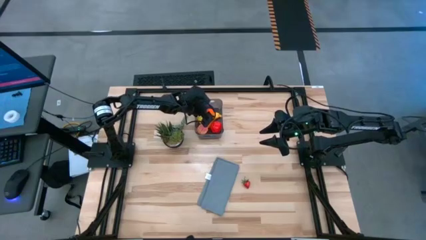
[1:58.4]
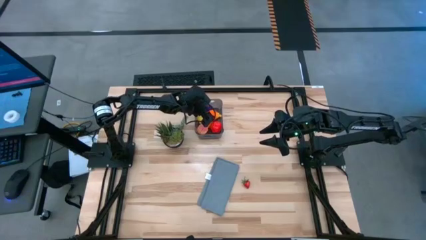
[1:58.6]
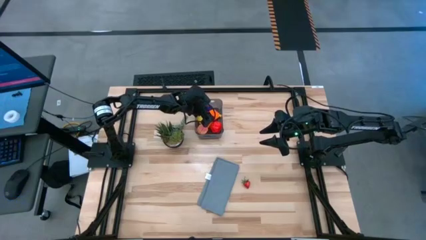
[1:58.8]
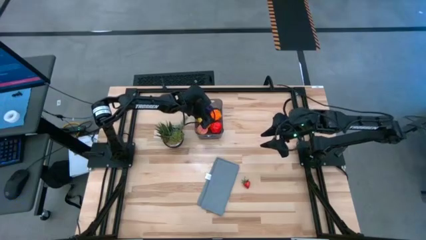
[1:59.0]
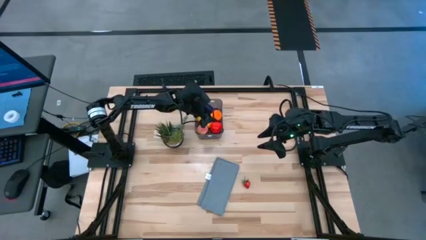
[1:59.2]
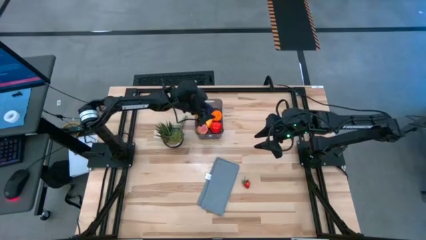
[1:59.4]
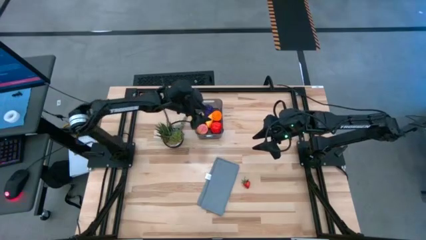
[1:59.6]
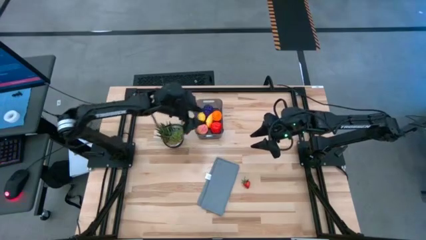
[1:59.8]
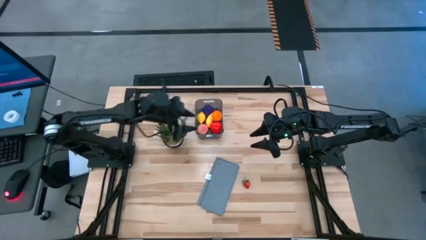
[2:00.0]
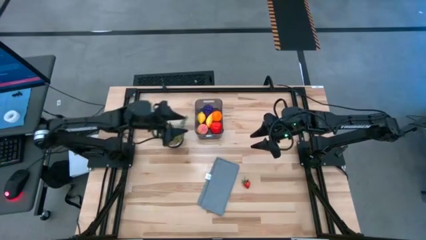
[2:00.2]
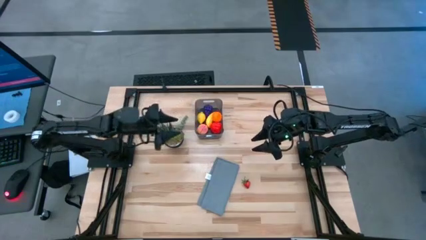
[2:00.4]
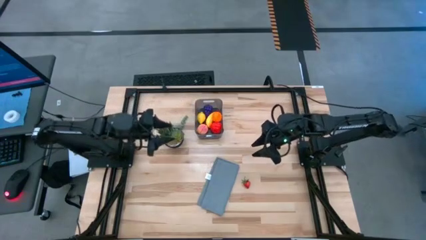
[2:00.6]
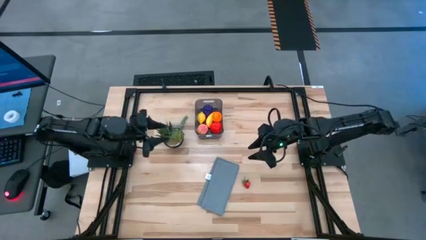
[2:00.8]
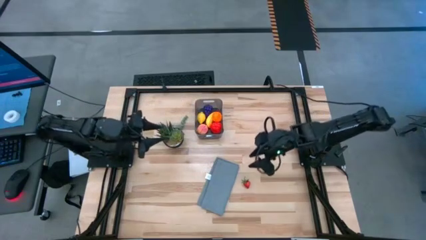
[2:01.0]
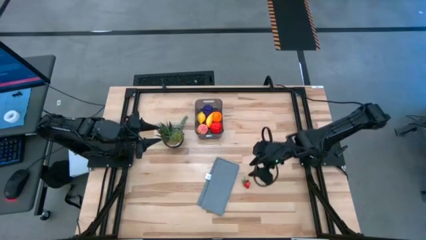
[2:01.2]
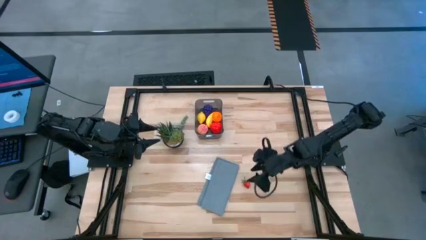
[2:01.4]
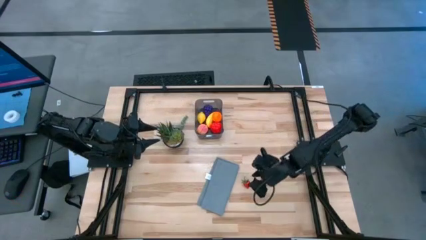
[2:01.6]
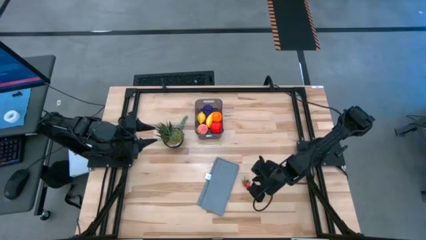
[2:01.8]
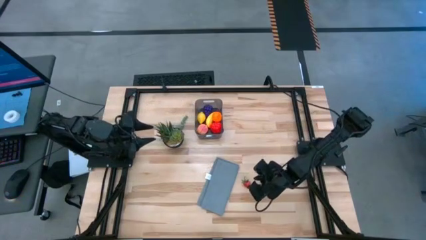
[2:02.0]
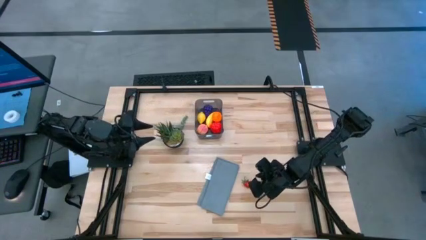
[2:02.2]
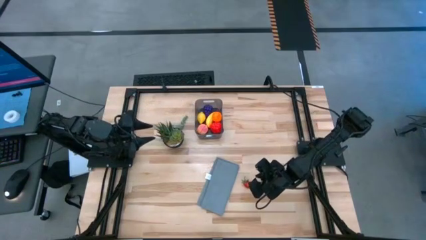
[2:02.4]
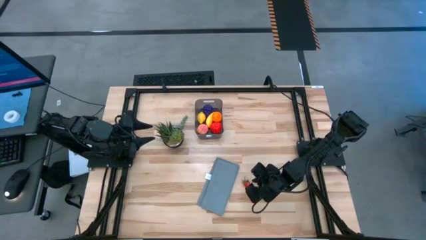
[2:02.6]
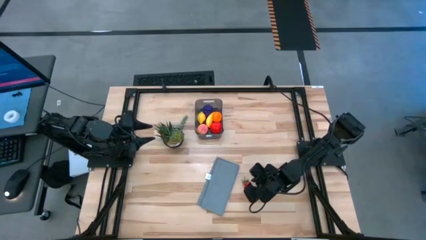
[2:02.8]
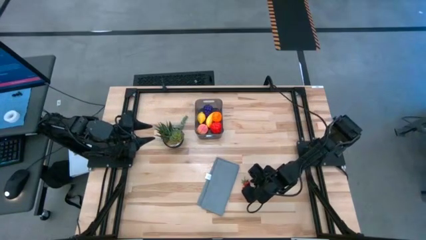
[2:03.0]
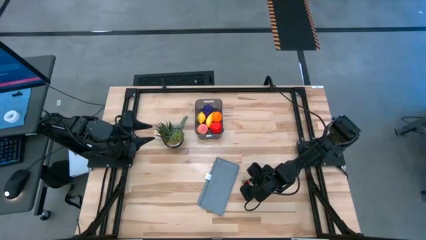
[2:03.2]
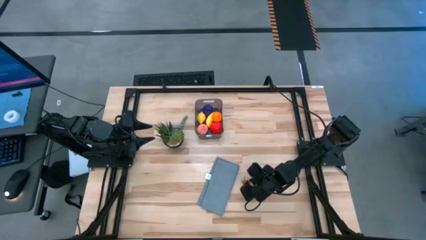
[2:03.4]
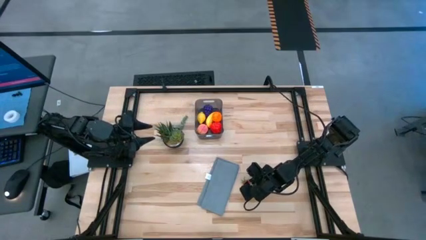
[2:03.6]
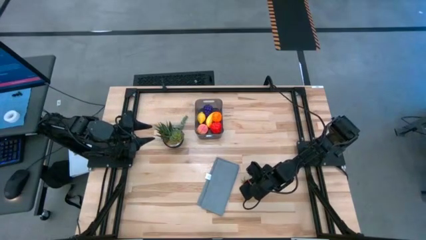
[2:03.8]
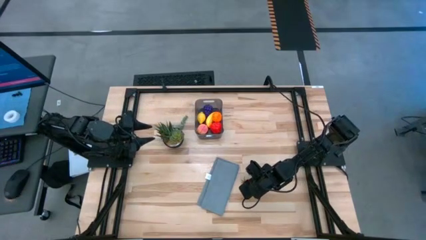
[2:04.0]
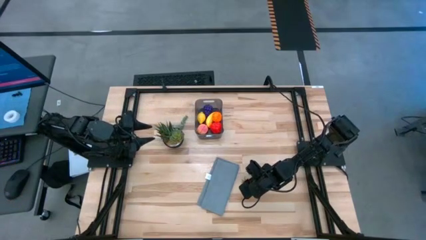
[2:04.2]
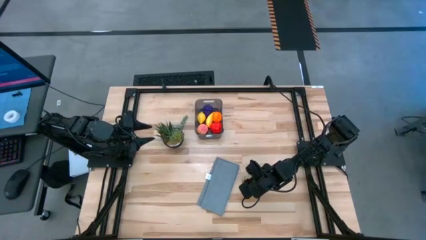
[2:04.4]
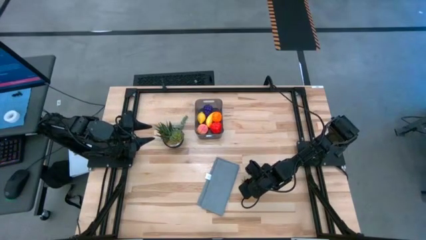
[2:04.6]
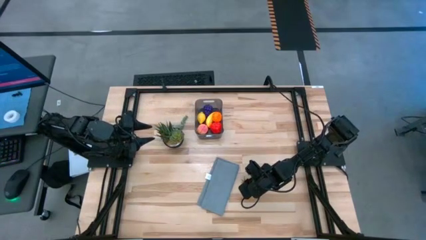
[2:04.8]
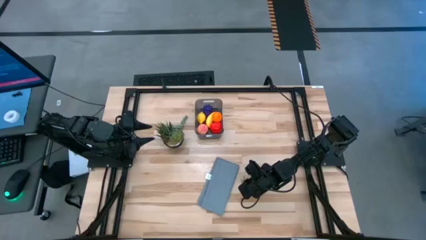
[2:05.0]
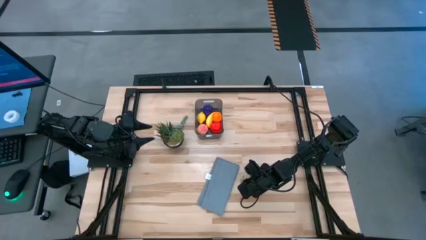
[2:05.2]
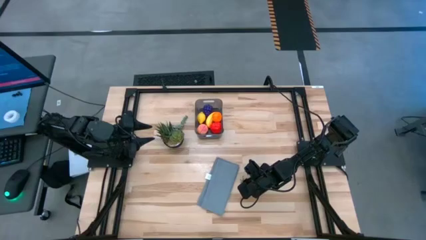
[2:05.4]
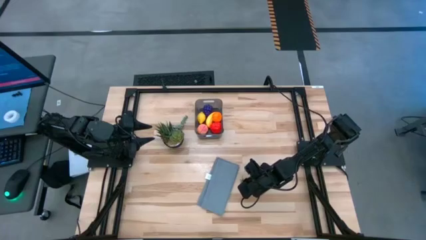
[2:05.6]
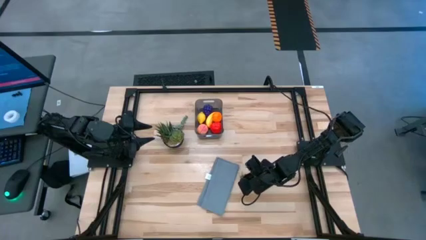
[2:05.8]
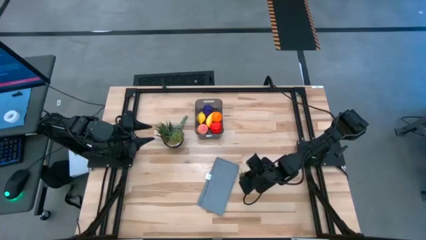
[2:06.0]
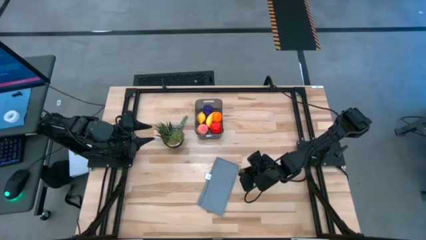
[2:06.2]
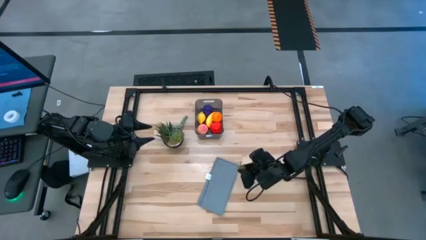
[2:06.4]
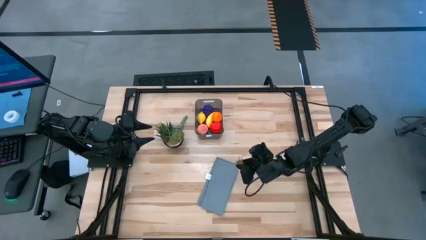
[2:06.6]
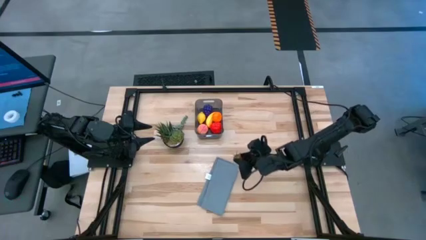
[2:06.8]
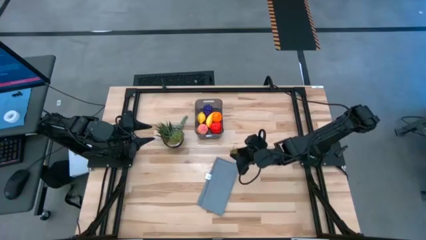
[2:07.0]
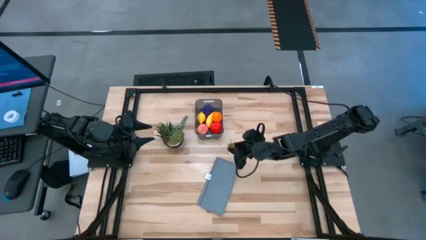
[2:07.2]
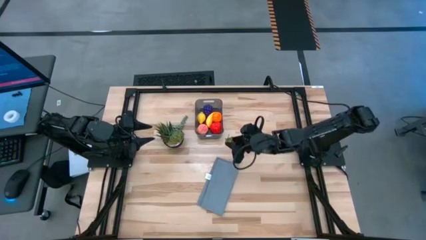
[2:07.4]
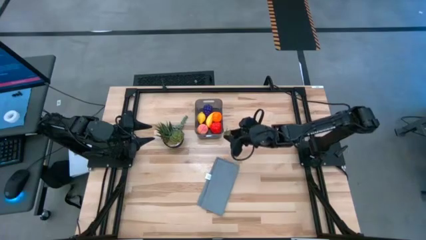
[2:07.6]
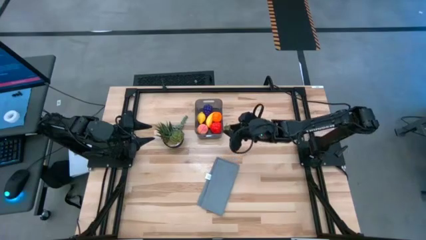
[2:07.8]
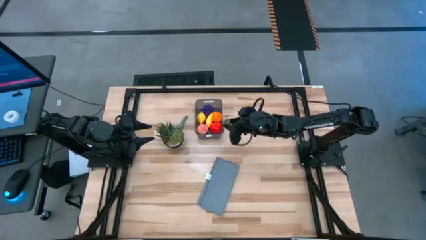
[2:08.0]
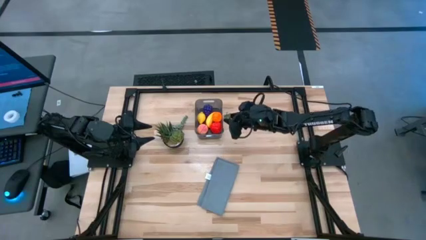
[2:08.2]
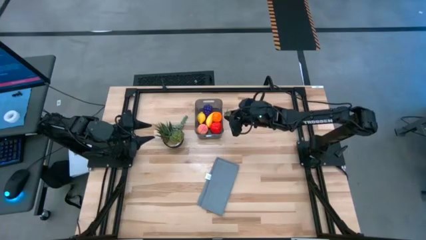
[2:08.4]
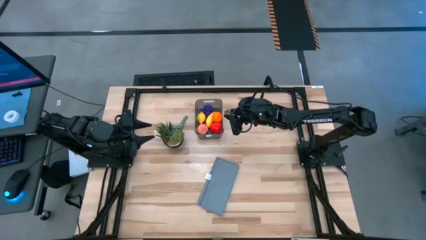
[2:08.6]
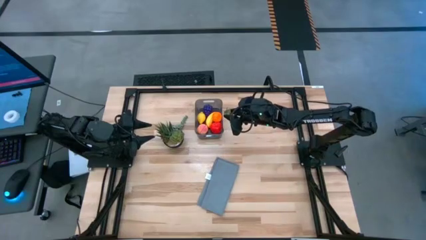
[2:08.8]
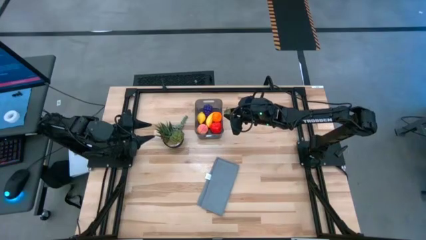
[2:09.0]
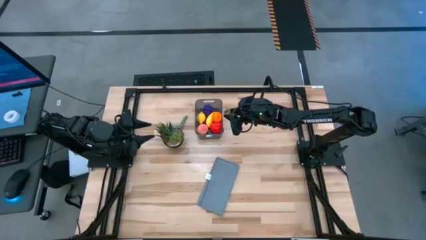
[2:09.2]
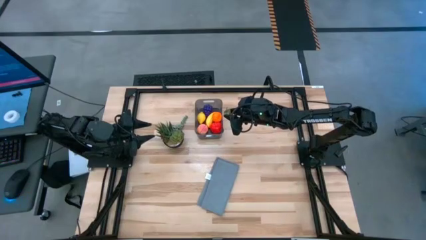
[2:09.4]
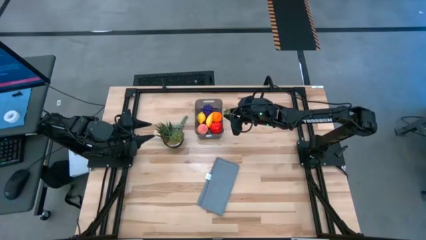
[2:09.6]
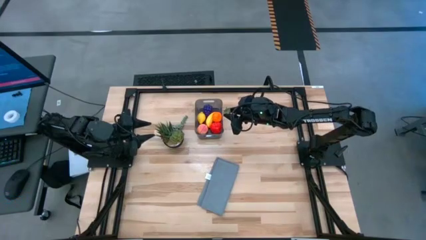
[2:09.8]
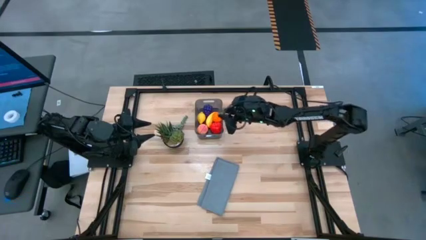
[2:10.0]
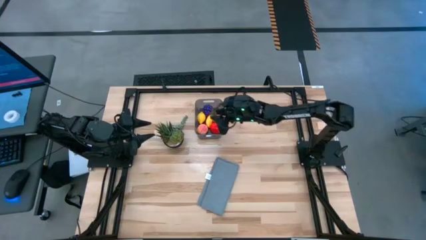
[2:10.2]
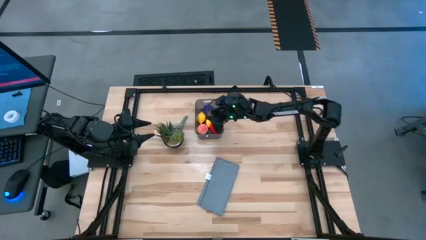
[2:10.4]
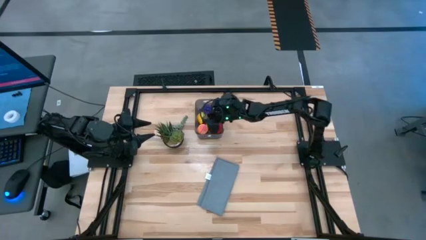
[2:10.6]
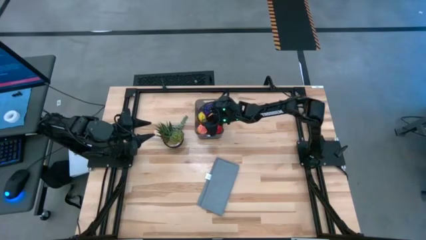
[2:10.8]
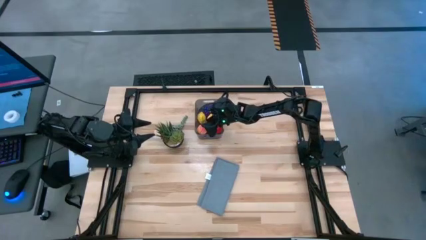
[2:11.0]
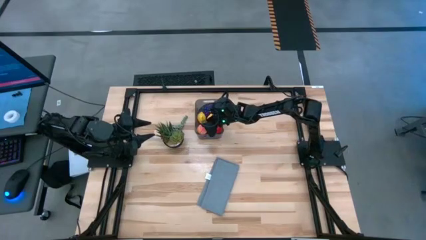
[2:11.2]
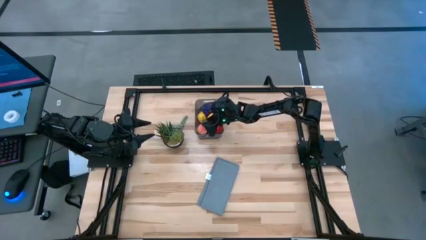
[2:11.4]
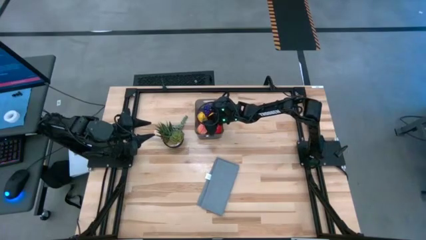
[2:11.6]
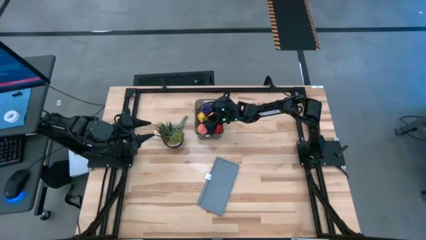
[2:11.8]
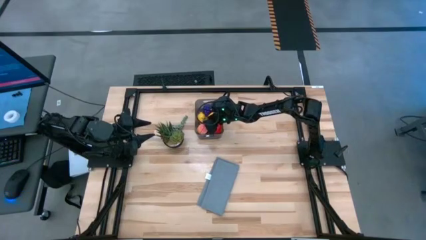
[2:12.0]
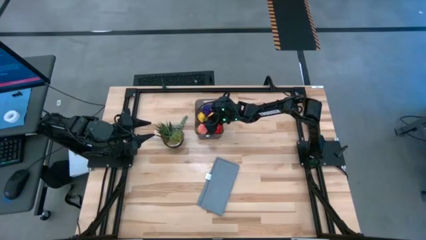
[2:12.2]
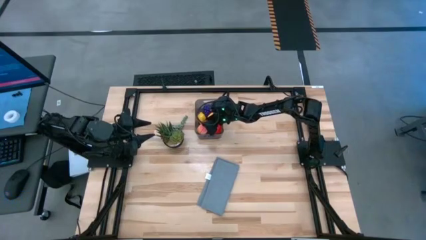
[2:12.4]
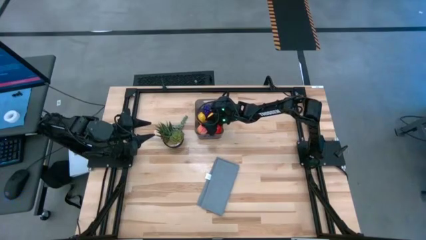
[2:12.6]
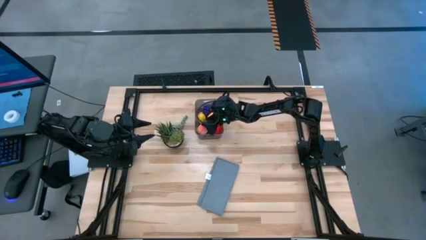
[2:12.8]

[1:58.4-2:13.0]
Task: Pick and placing Produce into tupperware
Put the red strawberry into the black black bin
